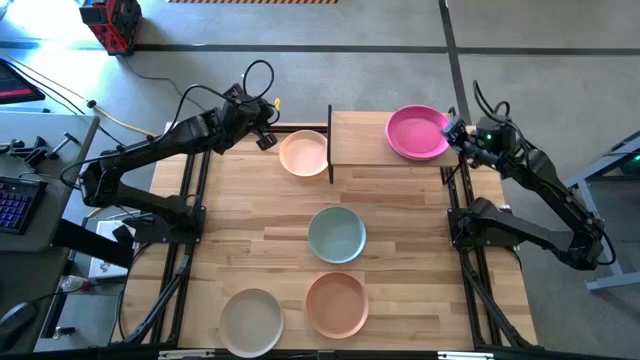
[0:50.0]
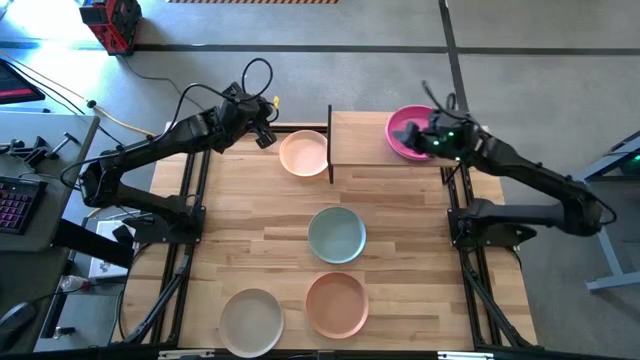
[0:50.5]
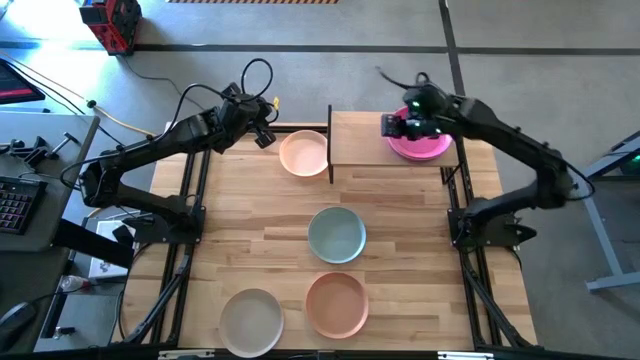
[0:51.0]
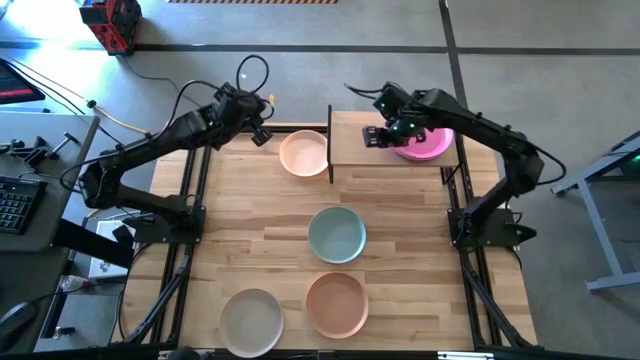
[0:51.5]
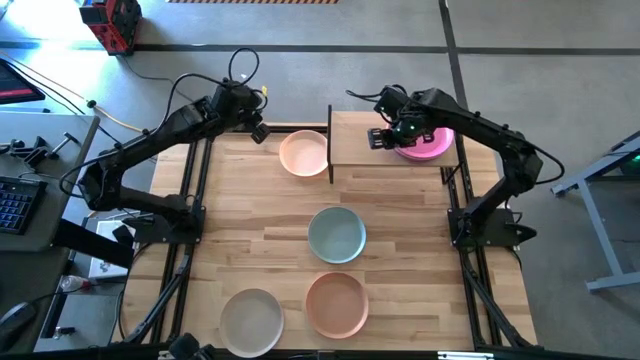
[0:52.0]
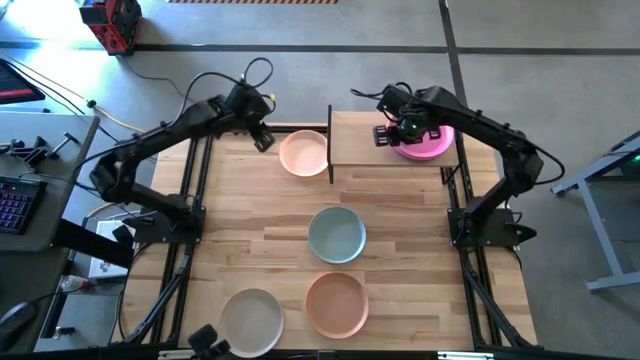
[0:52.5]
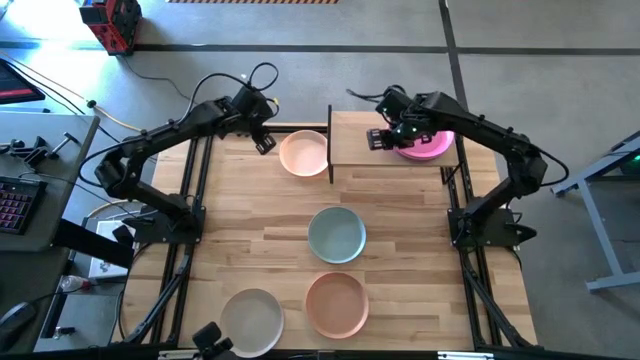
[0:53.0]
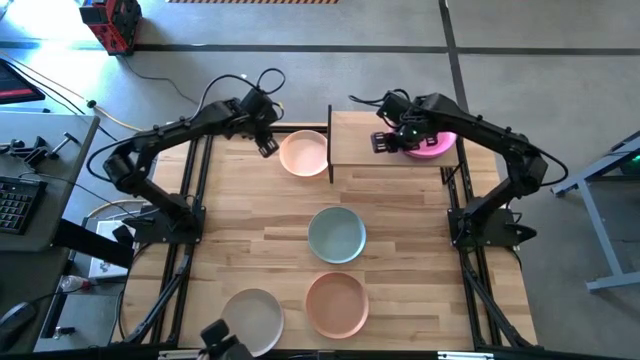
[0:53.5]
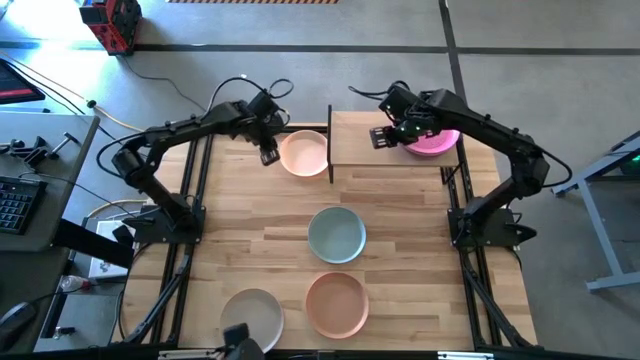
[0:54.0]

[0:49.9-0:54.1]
Task: Place and stack plates onto a shelf
Adjust the stacked plates on the shelf

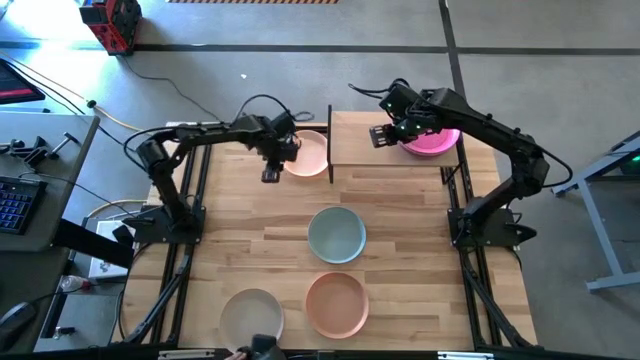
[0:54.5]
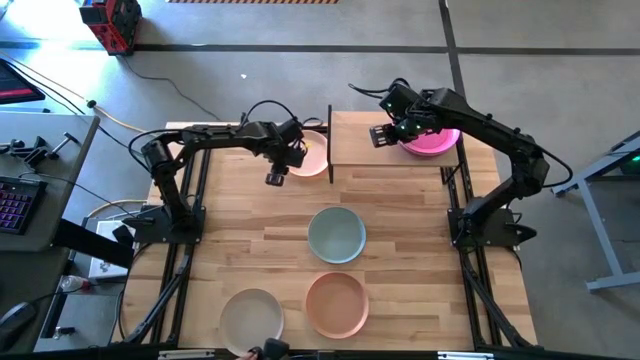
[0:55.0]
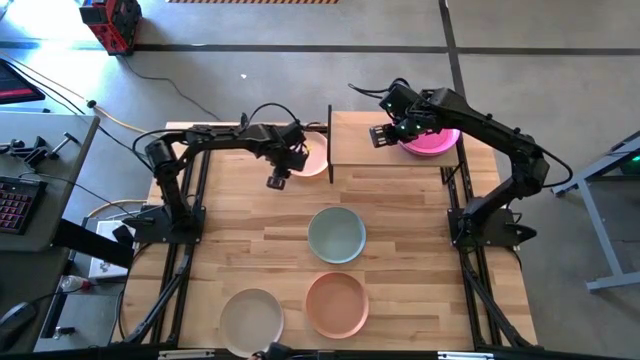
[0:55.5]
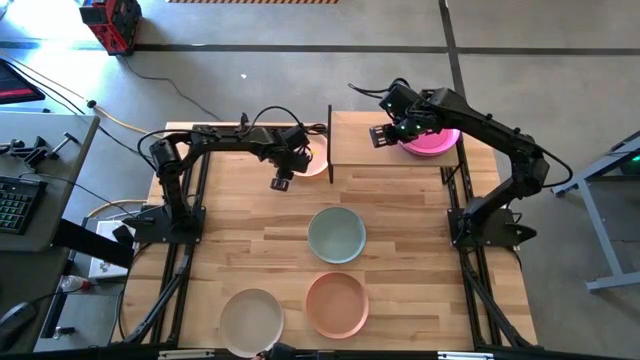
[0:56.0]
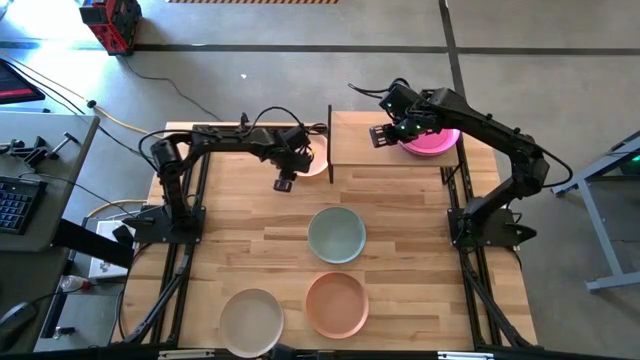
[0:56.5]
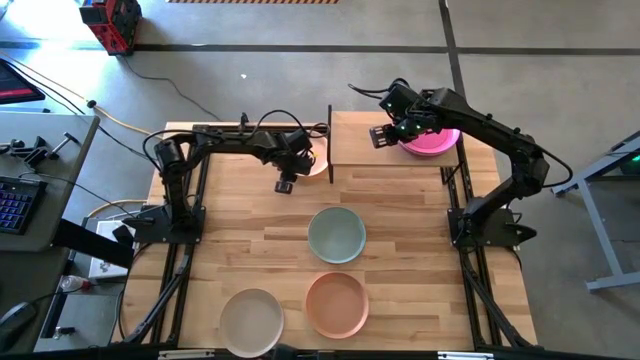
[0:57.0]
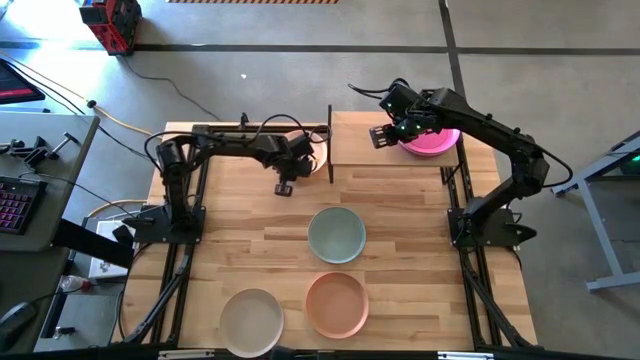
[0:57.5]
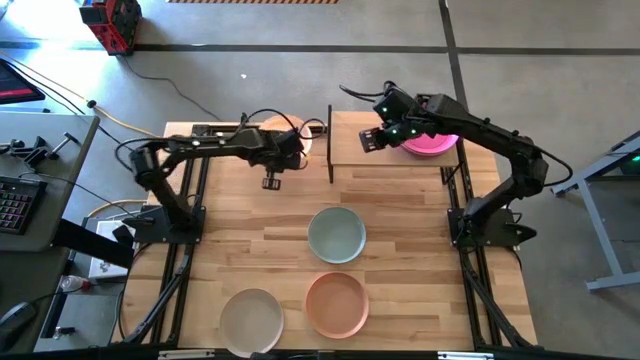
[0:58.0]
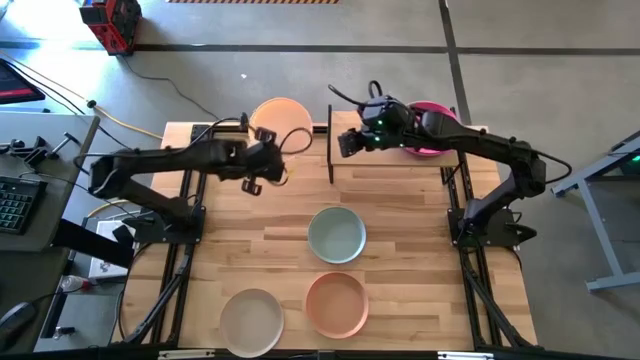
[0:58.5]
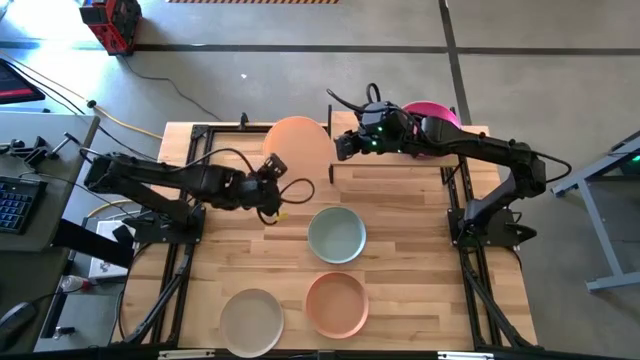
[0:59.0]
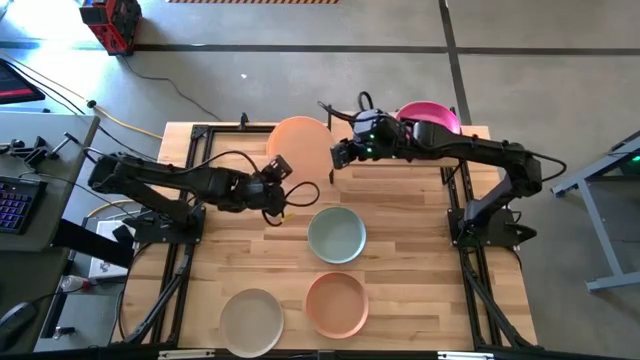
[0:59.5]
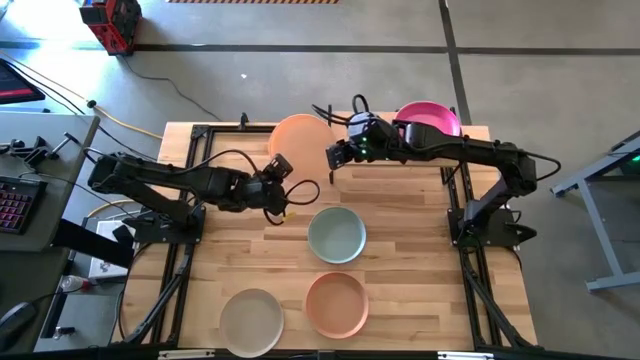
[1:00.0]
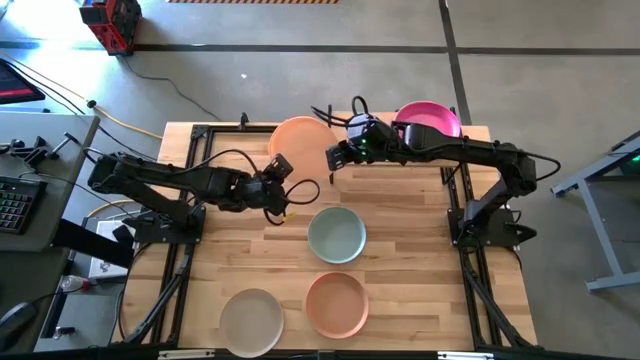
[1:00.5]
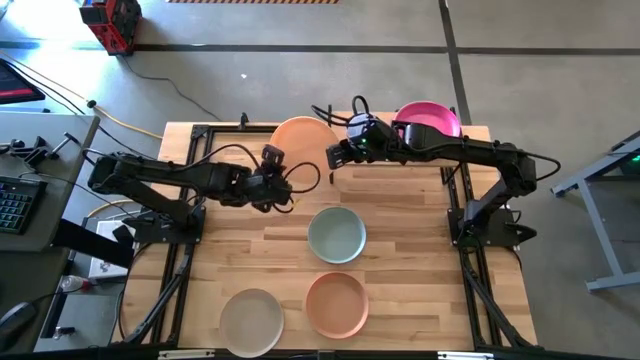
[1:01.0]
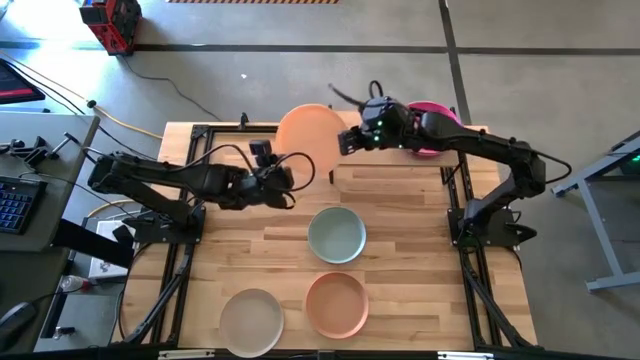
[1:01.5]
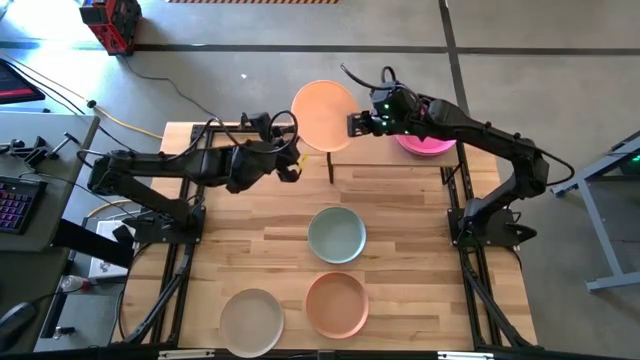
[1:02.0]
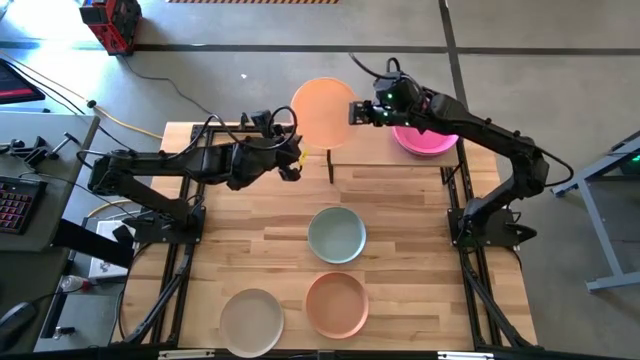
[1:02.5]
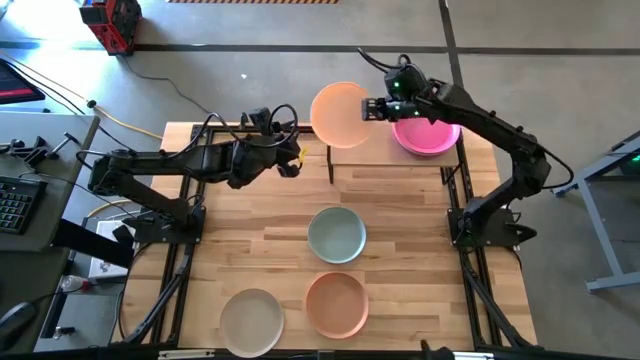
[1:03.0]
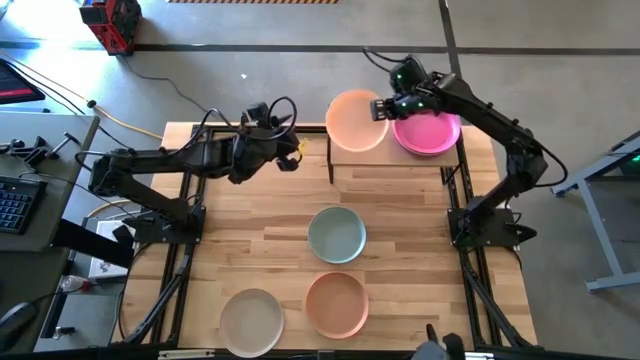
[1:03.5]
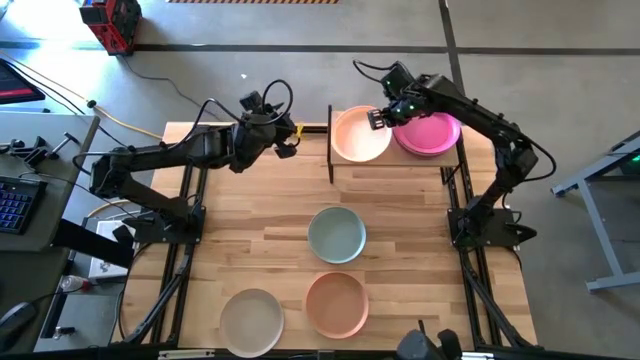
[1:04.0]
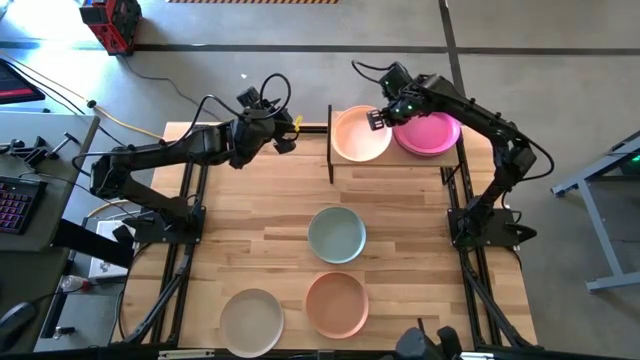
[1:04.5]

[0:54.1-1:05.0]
Put the light orange plate on the shelf

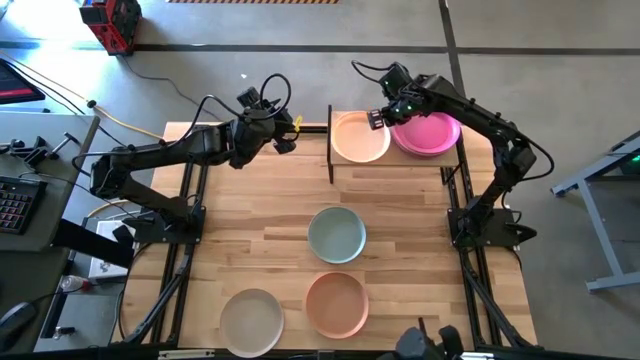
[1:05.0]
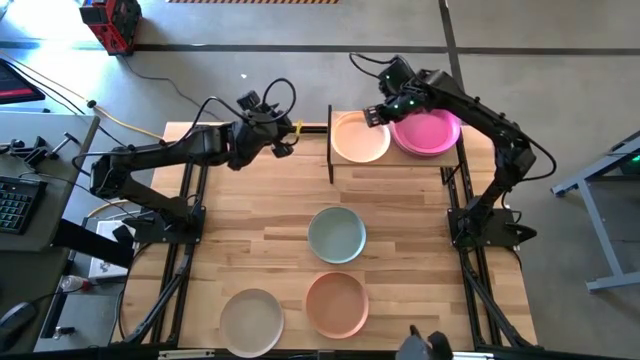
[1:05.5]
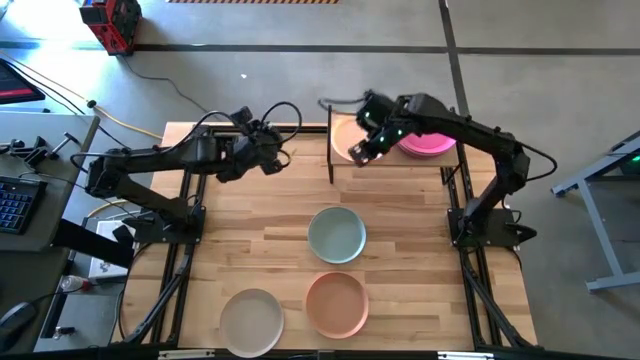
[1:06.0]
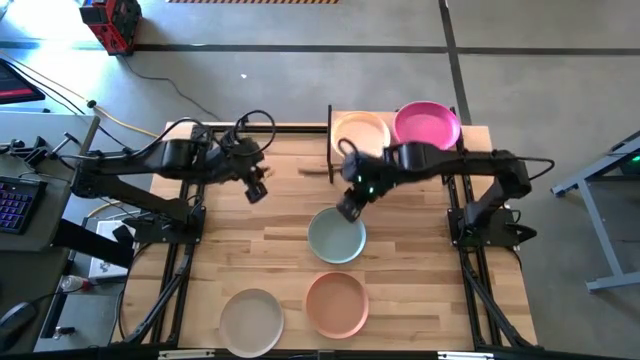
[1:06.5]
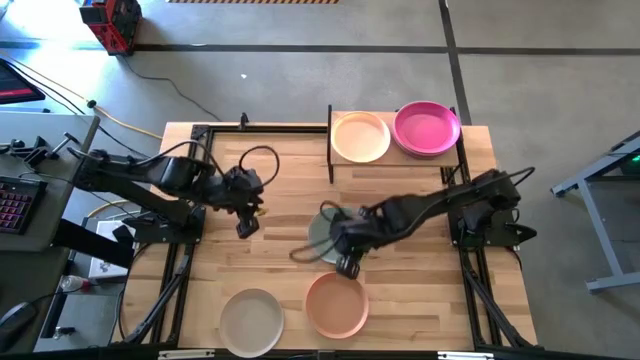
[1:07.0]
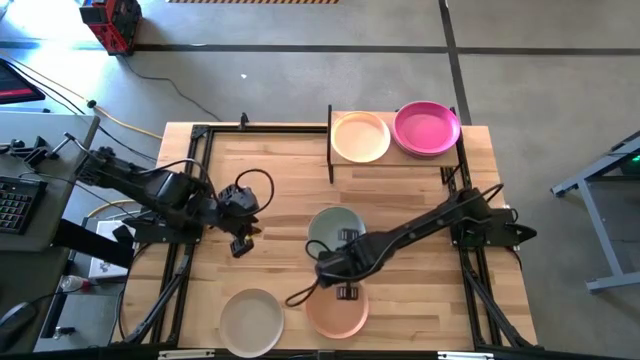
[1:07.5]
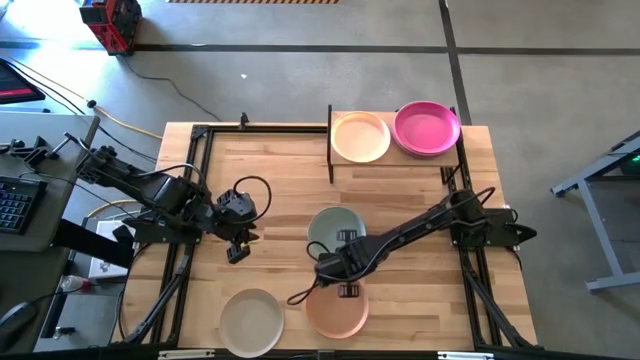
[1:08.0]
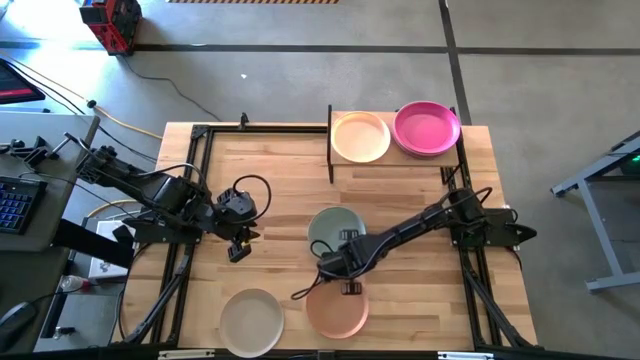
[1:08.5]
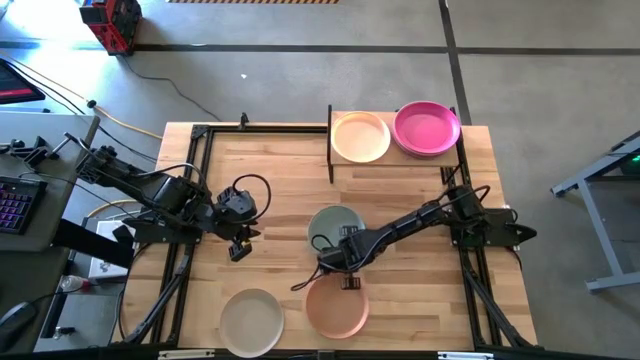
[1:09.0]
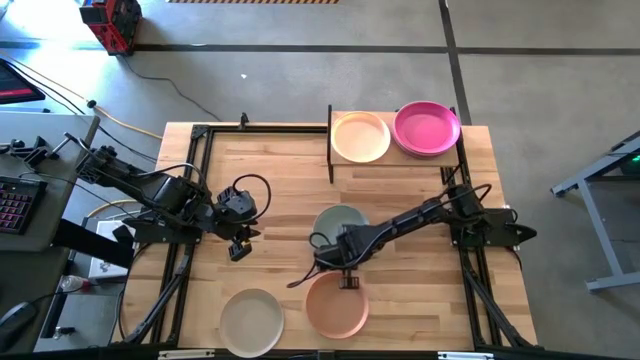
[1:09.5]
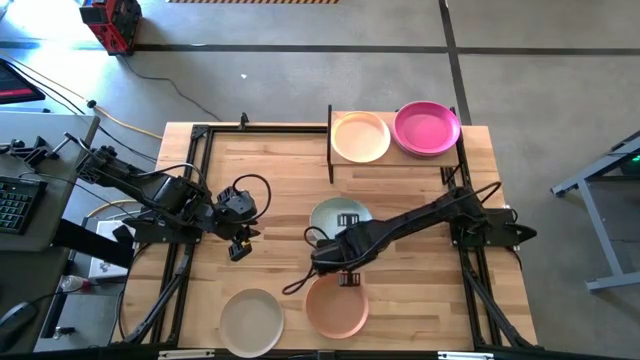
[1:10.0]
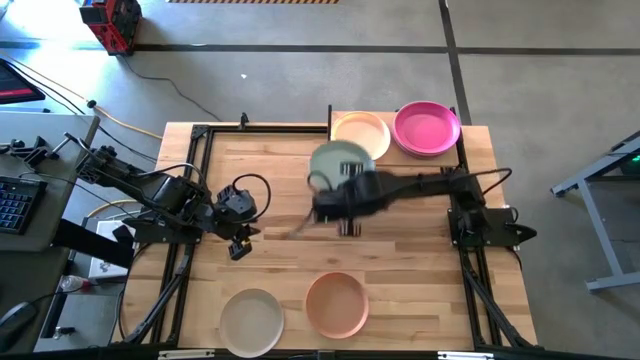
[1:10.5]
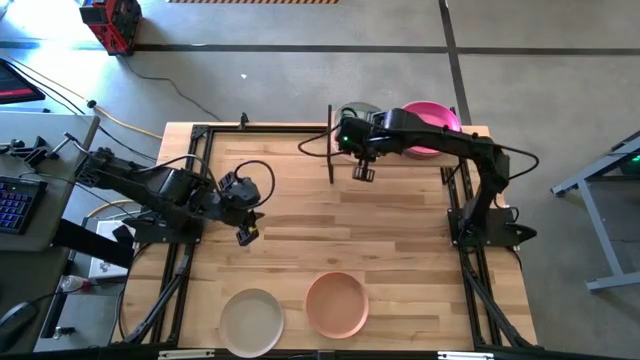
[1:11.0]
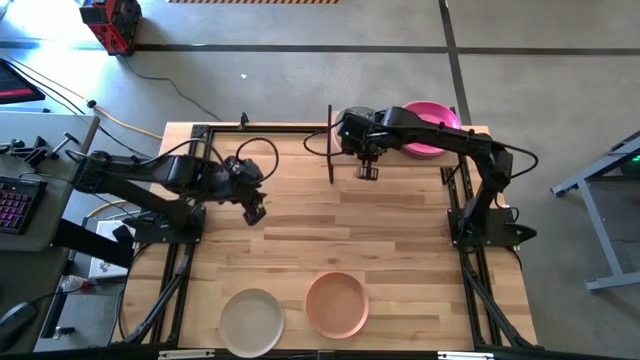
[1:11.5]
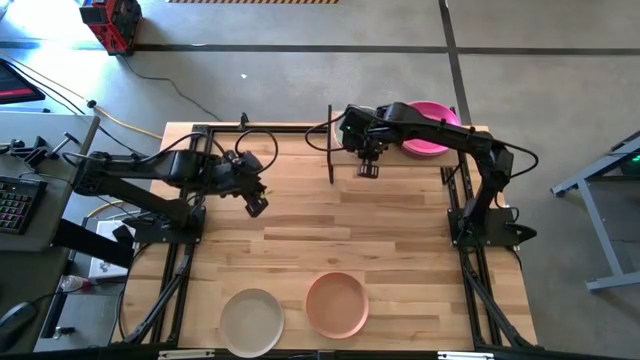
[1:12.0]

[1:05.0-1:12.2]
Stack the light blue plate on top of the yellow plate on the shelf
